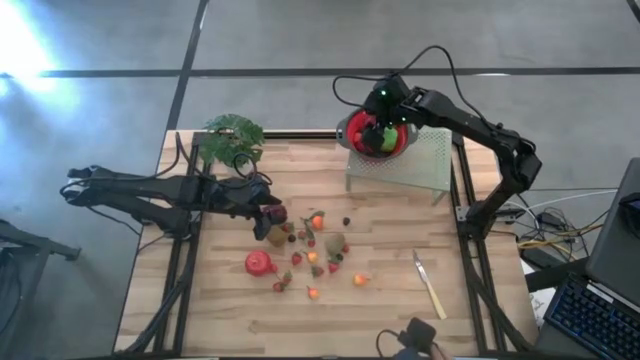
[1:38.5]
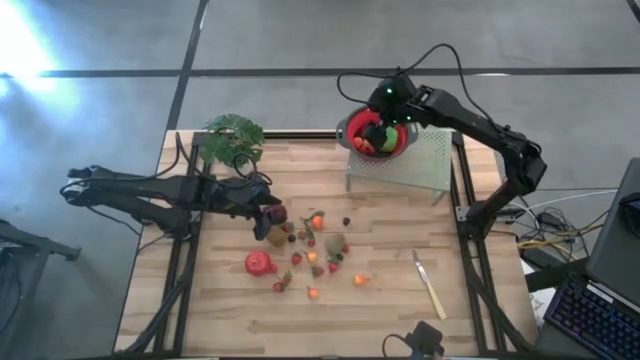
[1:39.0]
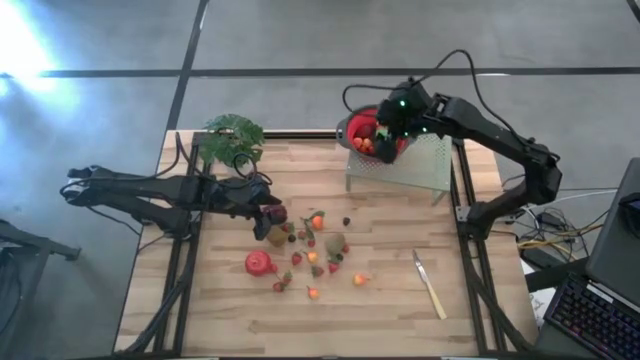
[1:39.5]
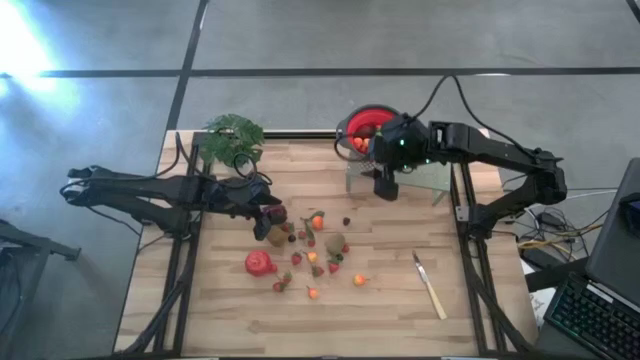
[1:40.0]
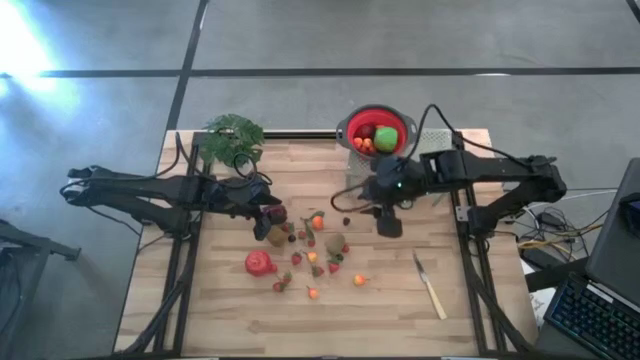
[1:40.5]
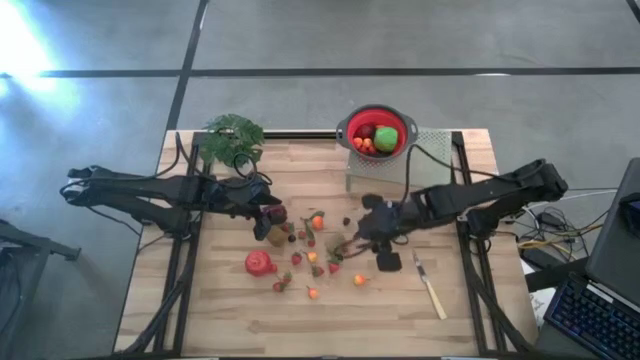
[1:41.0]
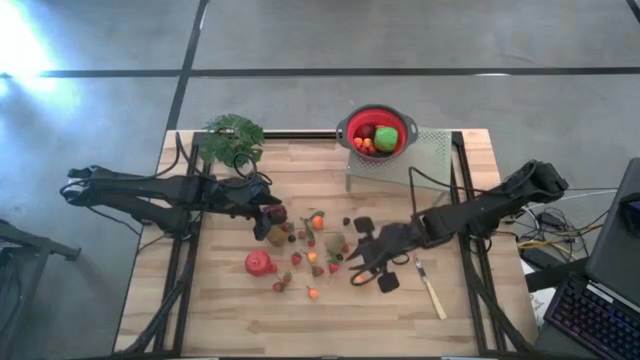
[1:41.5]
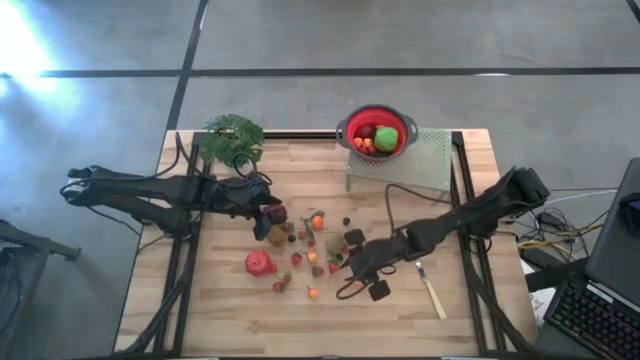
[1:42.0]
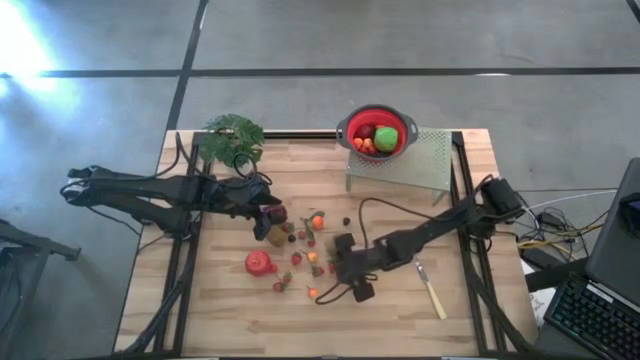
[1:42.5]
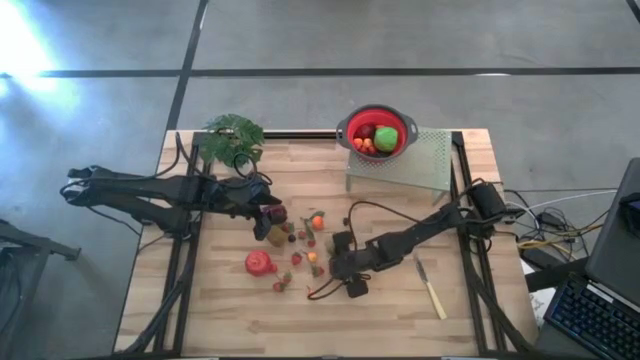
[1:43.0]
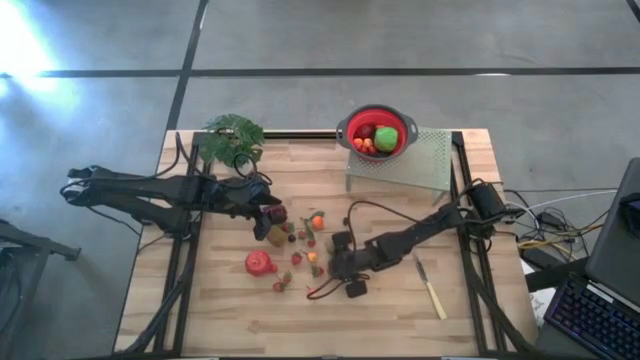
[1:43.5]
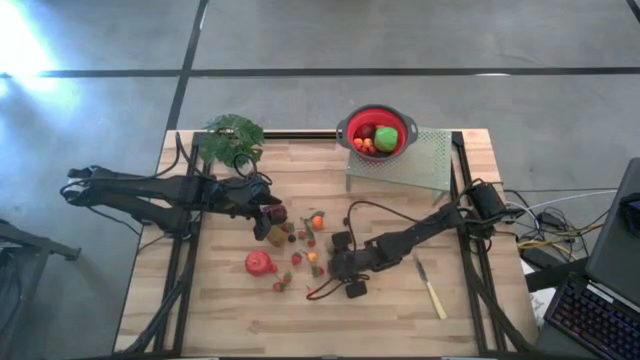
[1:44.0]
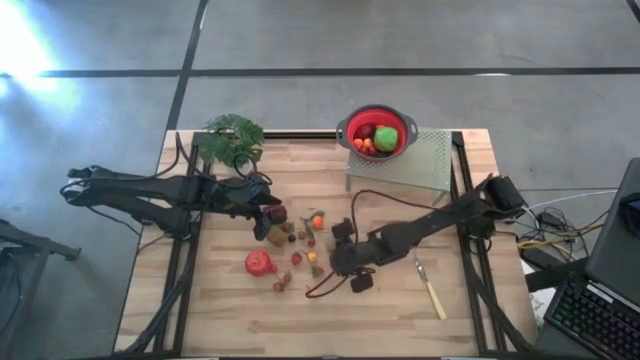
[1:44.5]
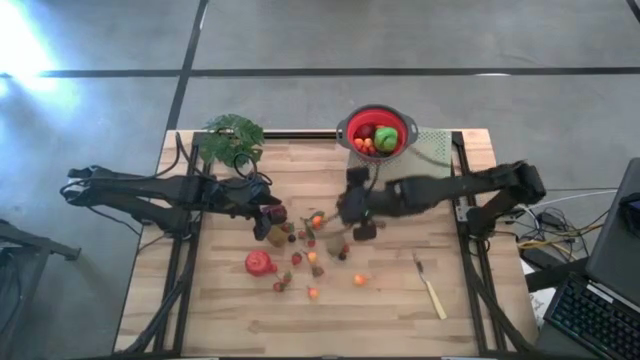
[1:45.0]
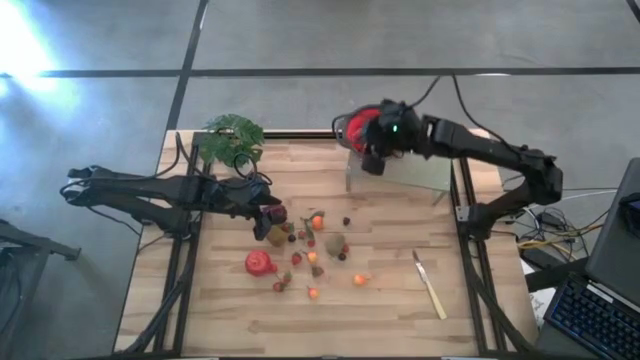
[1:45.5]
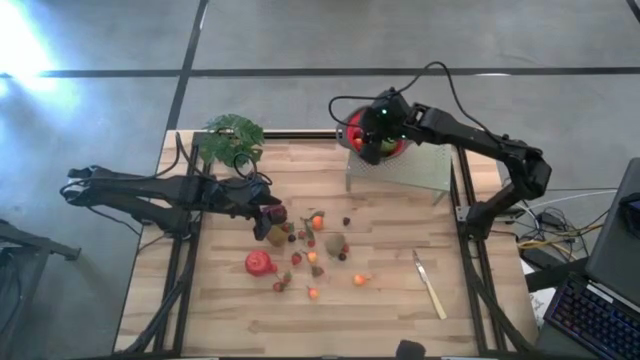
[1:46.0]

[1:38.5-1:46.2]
Task: Pick & Place Fruit
Put the strawberry into the strainer bowl on the shelf

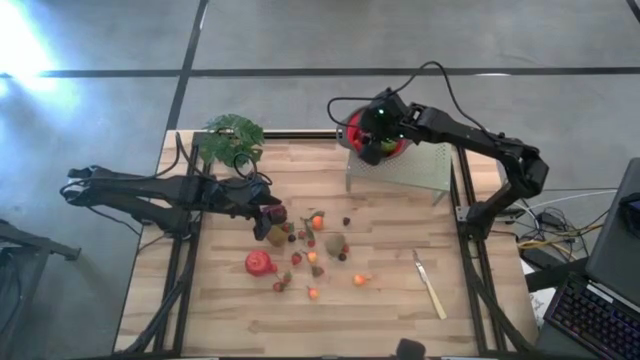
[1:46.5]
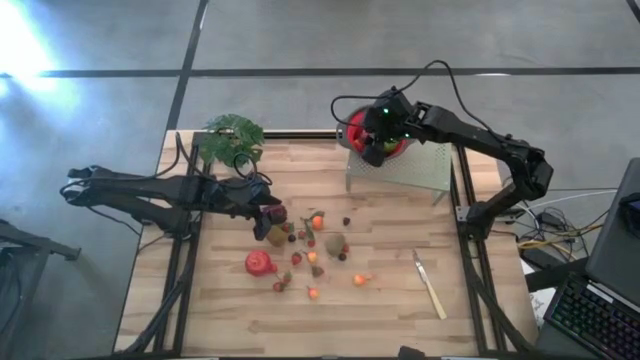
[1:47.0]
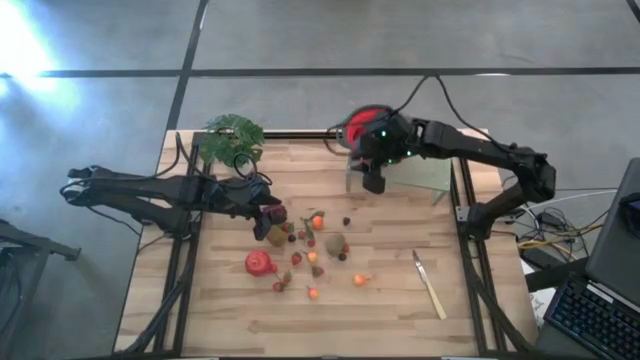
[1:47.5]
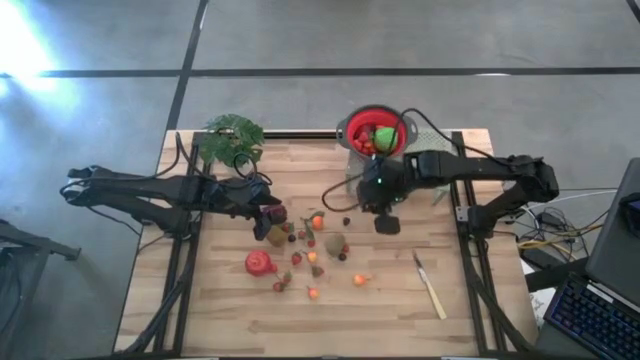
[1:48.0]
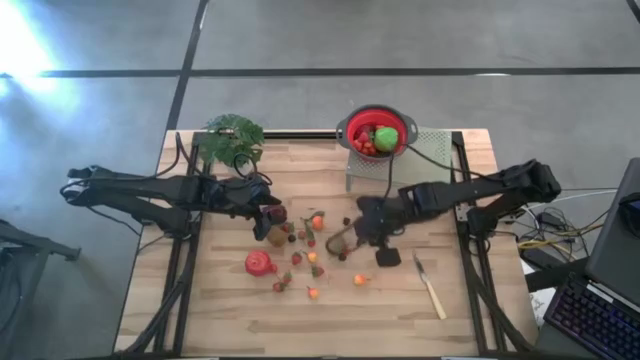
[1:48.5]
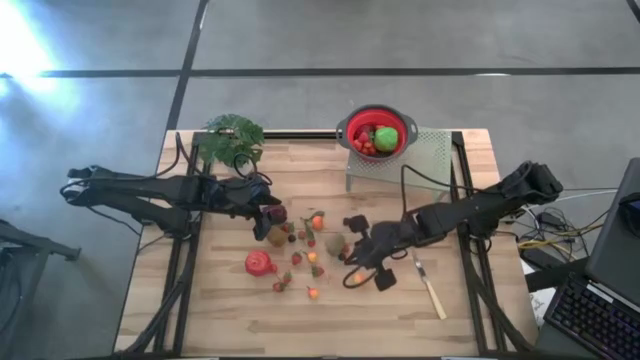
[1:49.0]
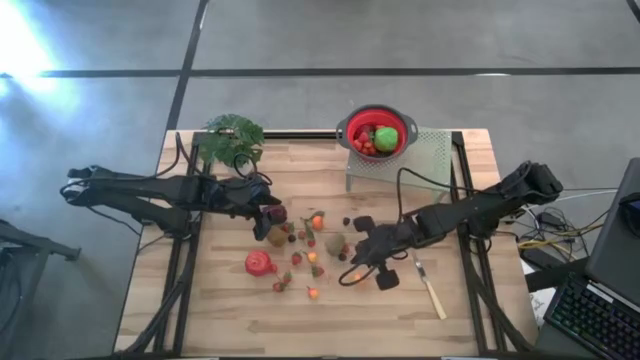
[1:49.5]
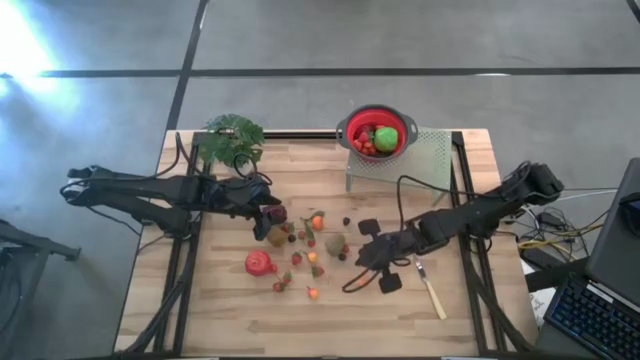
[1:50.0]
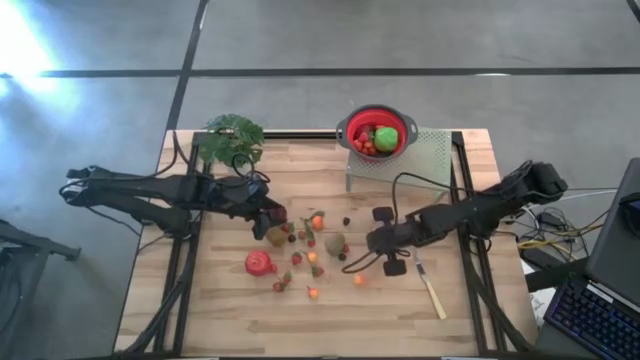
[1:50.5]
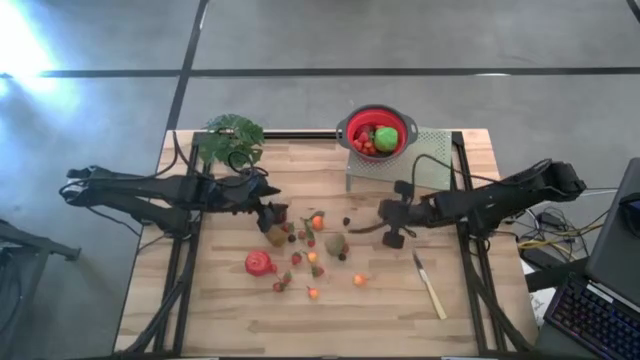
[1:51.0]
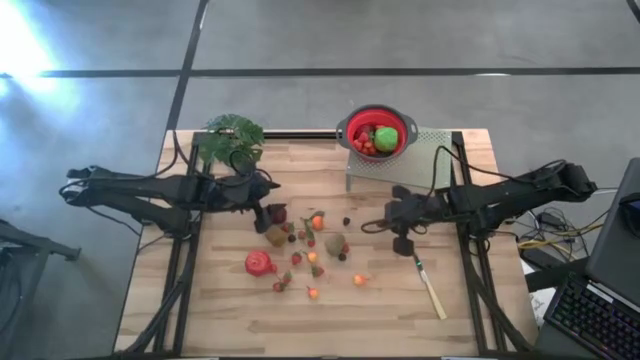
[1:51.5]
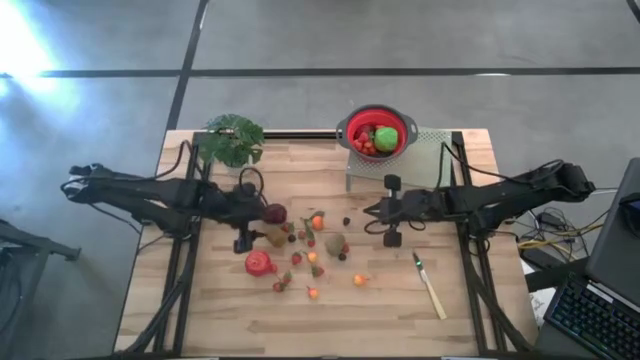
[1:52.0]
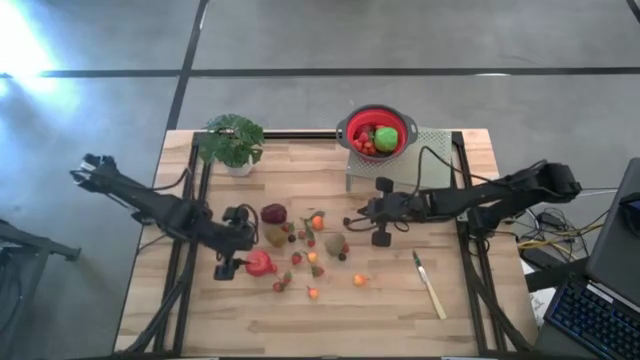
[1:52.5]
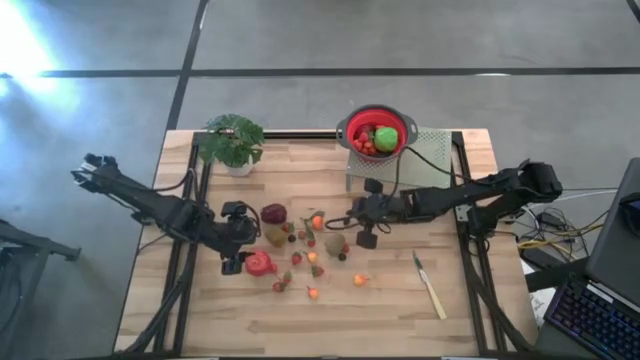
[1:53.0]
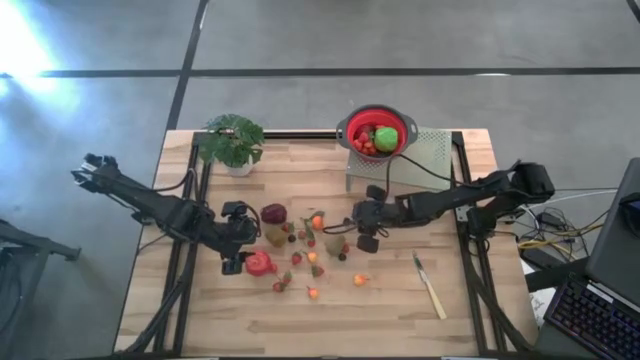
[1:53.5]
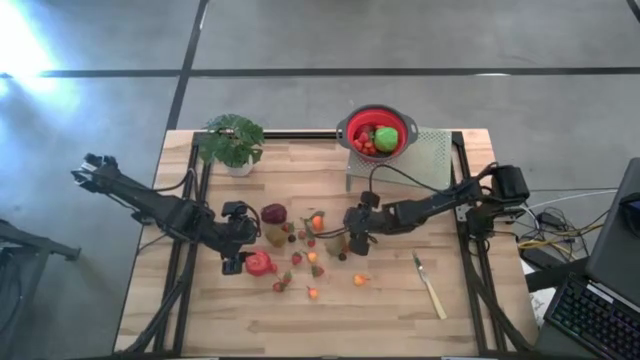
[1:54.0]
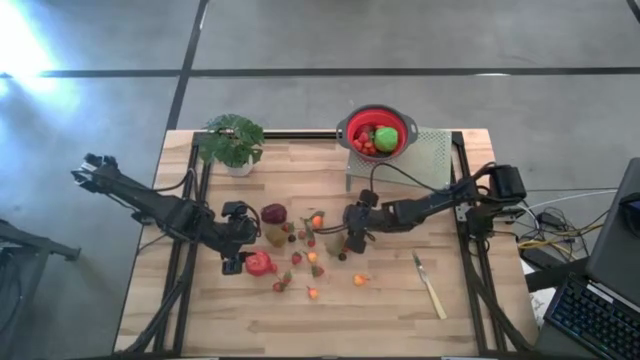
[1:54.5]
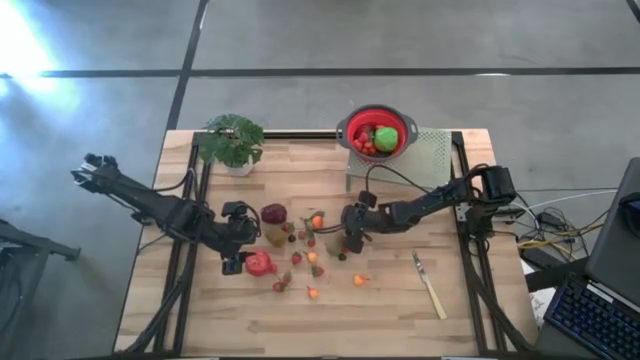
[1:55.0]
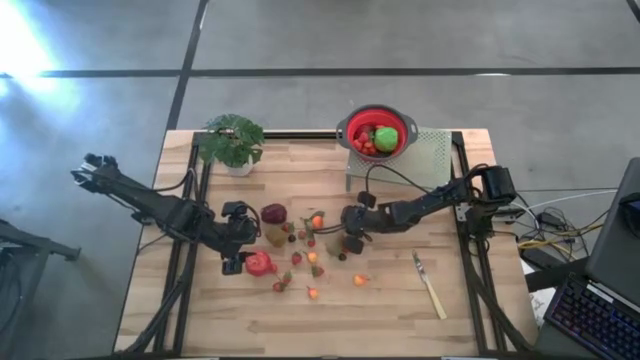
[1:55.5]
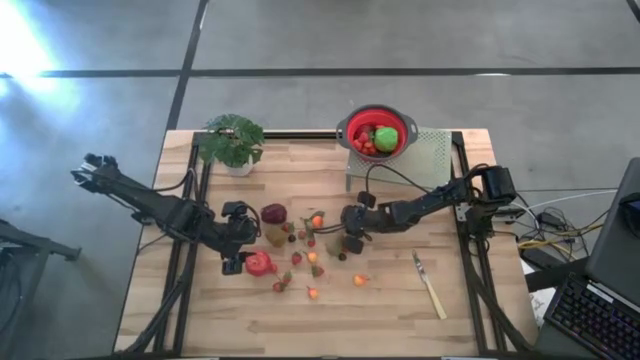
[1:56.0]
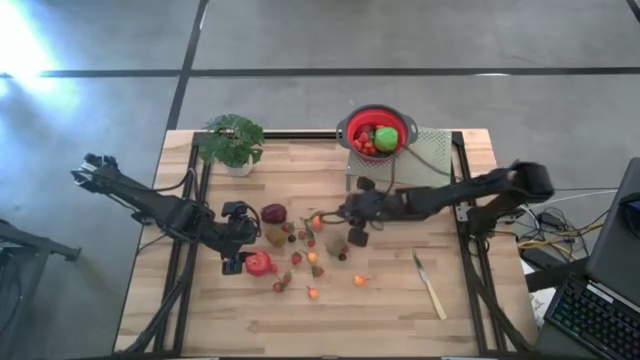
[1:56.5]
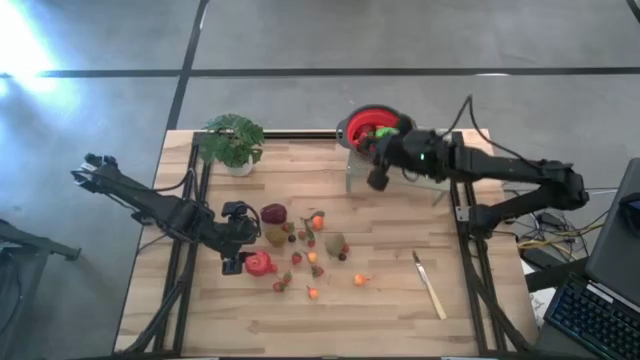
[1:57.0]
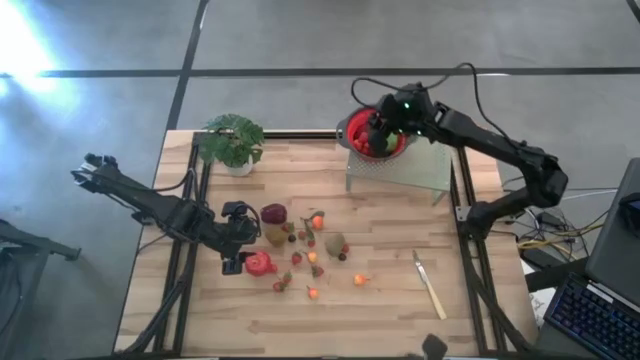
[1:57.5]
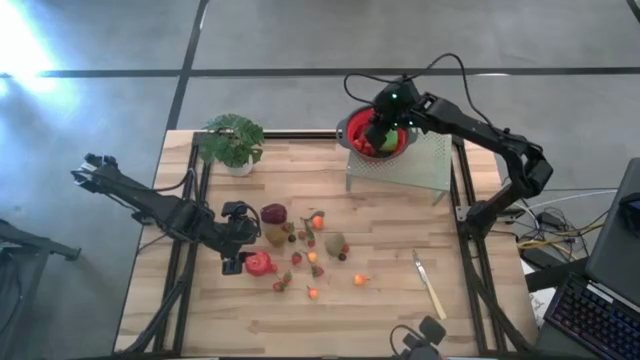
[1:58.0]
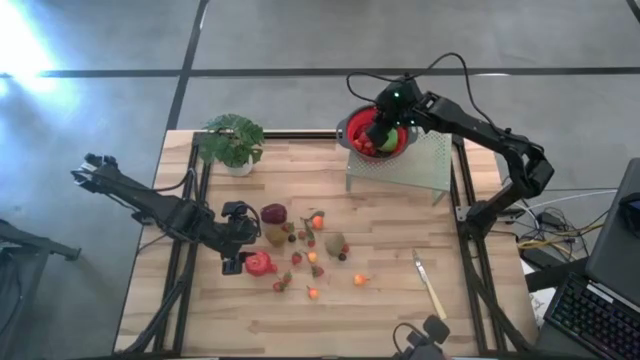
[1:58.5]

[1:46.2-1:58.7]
Put the blackberry into the strainer bowl on the shelf
